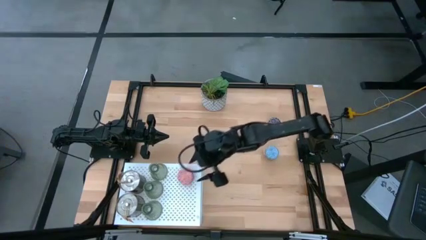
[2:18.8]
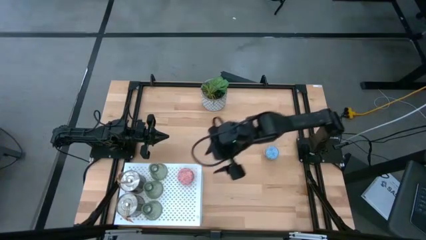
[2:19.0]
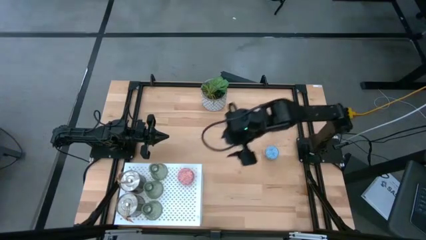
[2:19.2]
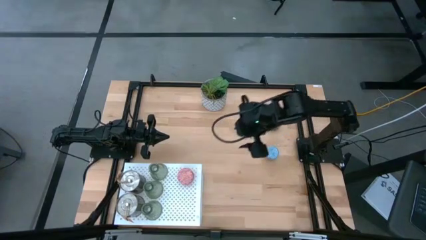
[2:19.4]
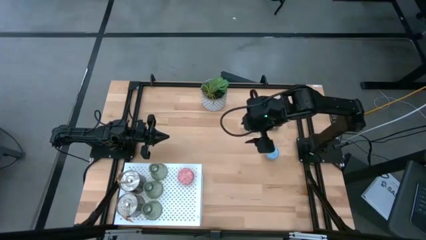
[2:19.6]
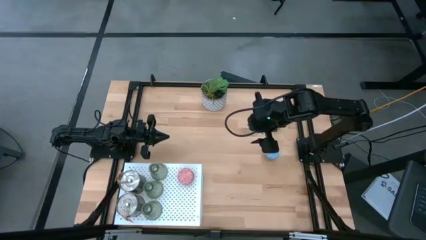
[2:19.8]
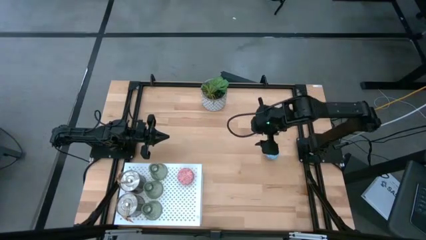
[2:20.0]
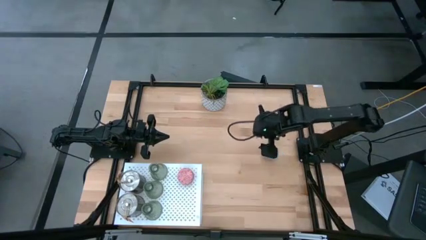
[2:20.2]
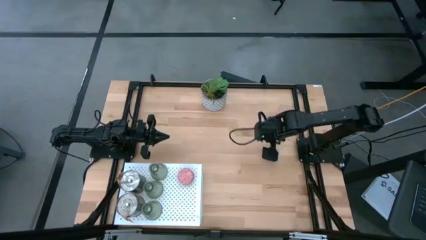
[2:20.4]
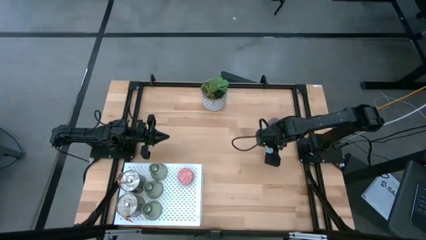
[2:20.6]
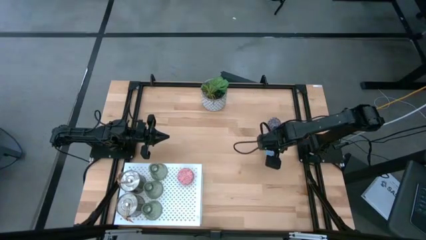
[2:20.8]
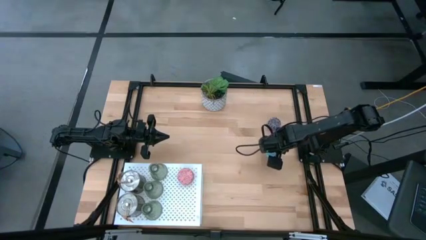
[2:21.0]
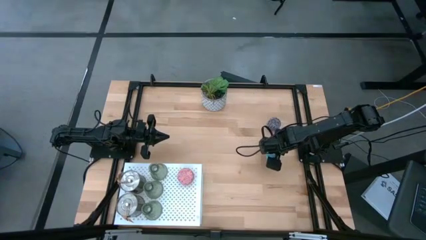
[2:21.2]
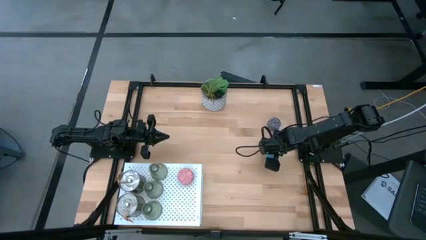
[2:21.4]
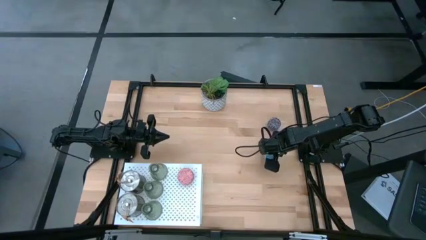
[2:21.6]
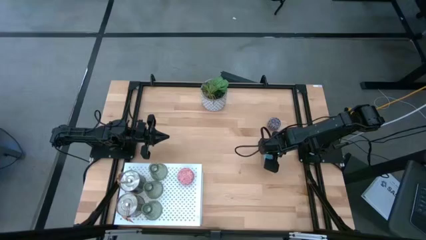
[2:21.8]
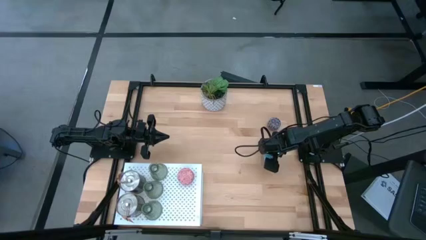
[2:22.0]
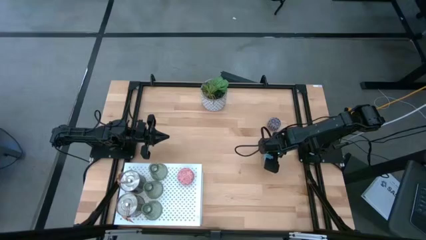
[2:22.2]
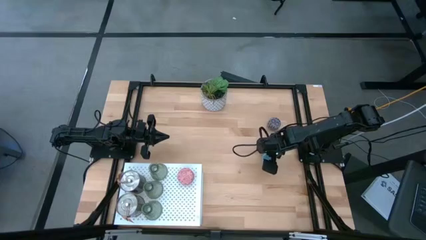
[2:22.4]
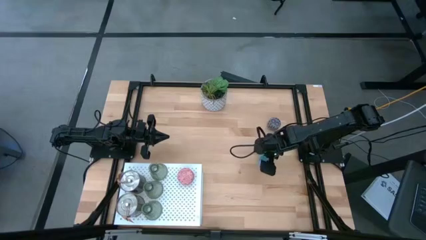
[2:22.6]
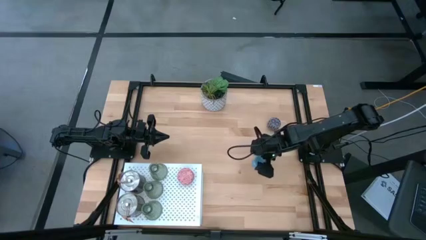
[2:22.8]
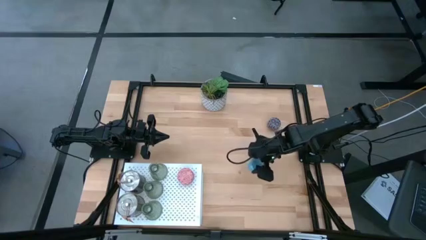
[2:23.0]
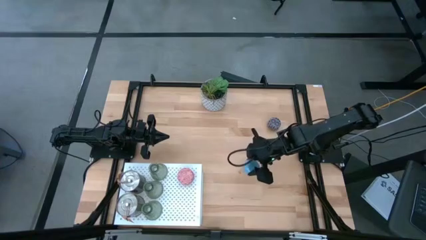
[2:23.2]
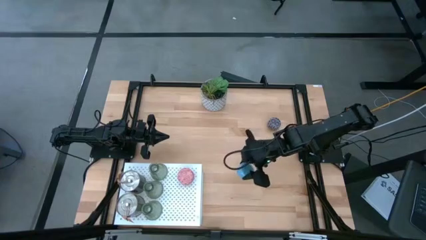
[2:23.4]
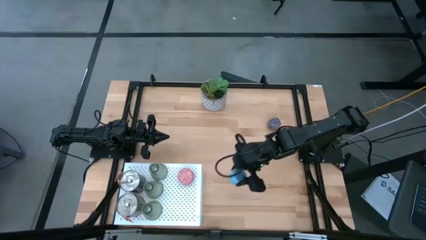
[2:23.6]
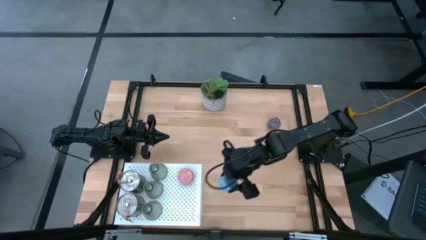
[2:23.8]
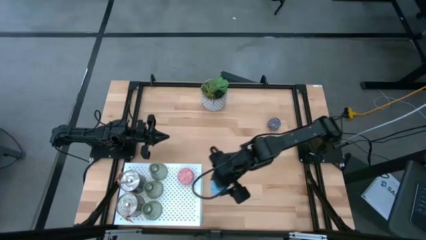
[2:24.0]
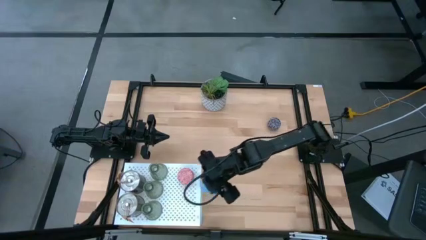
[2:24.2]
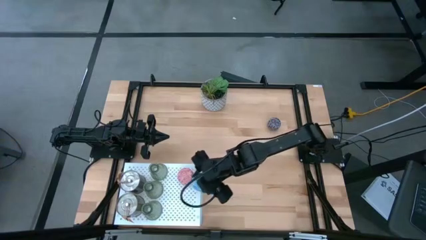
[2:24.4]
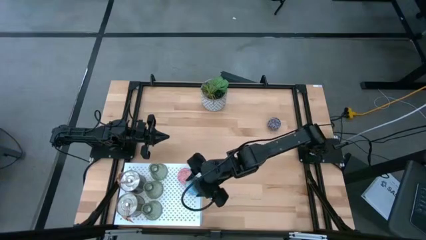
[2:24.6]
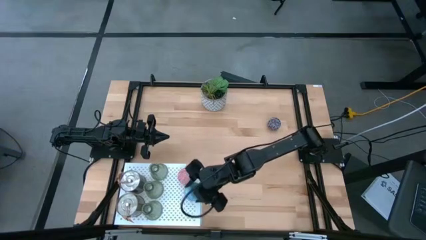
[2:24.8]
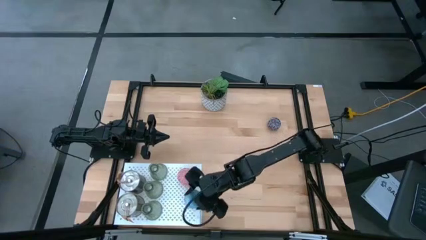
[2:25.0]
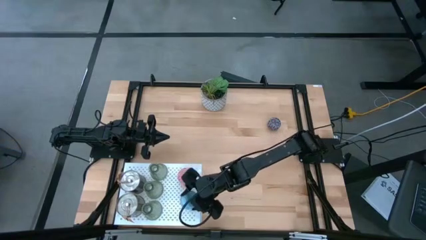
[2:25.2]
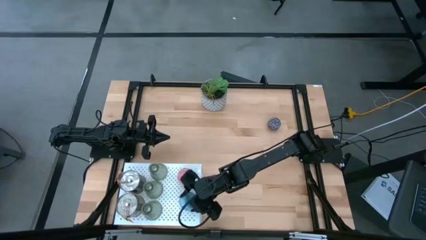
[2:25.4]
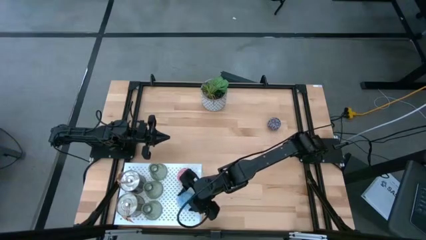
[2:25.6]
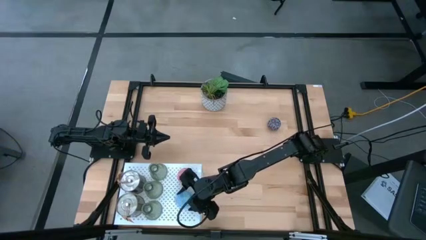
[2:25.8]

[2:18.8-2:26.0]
Task: Pick & Place candle stick holders
Put the blue scented candle on the shelf

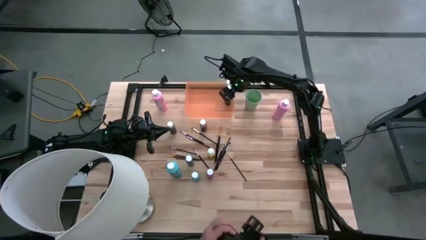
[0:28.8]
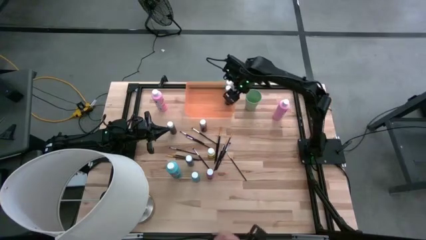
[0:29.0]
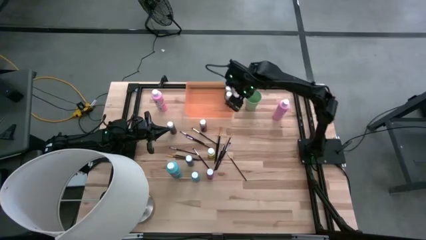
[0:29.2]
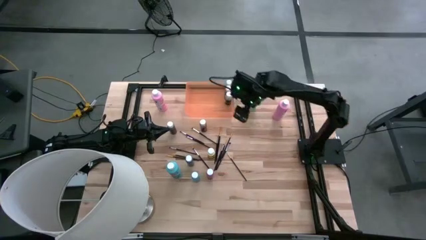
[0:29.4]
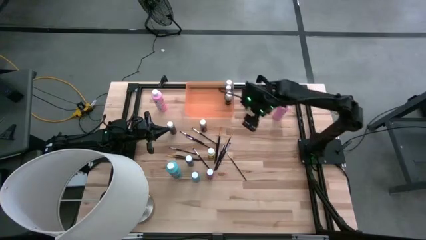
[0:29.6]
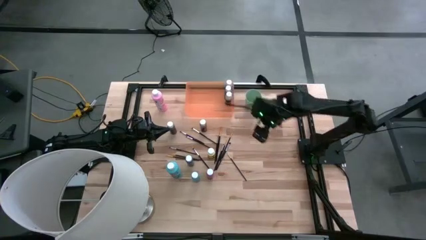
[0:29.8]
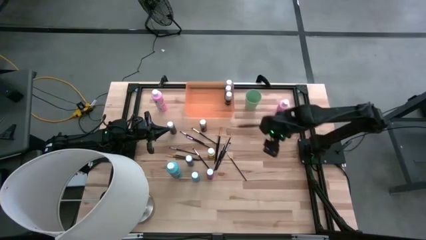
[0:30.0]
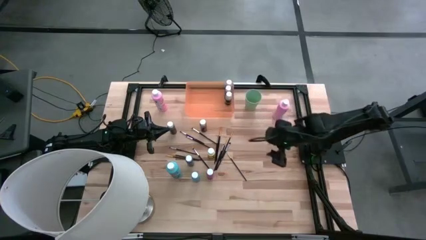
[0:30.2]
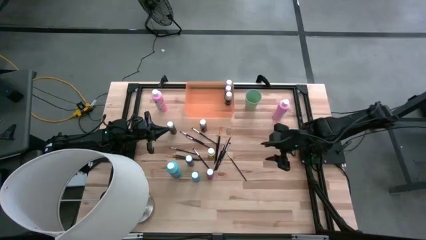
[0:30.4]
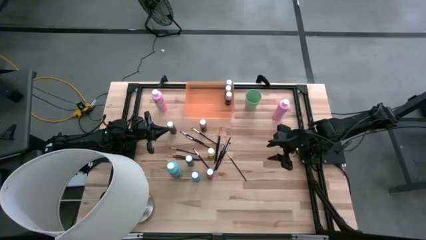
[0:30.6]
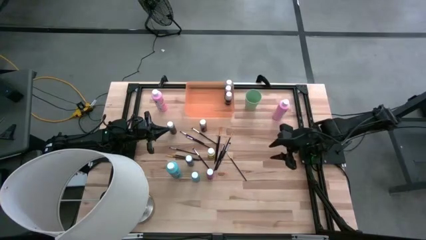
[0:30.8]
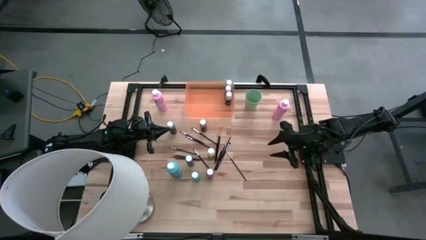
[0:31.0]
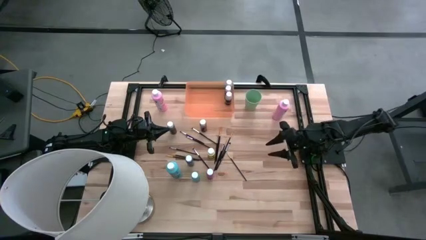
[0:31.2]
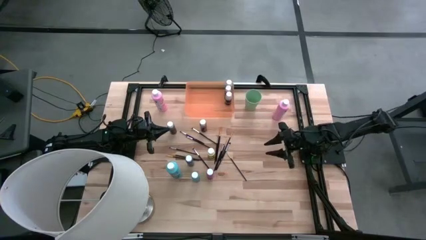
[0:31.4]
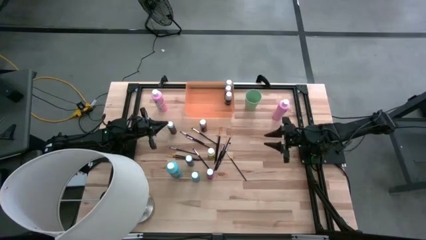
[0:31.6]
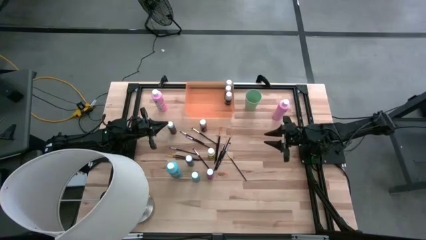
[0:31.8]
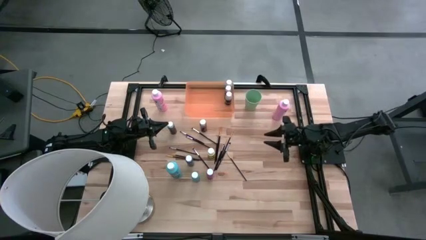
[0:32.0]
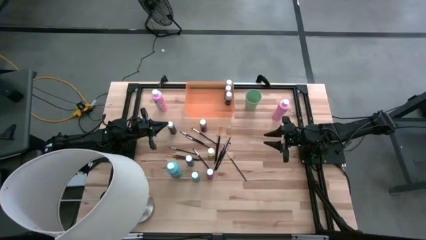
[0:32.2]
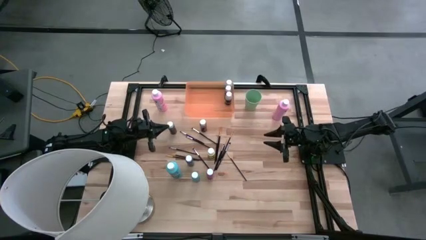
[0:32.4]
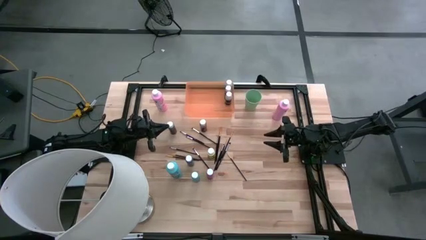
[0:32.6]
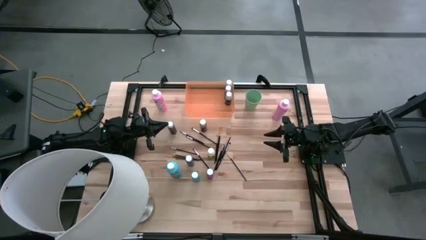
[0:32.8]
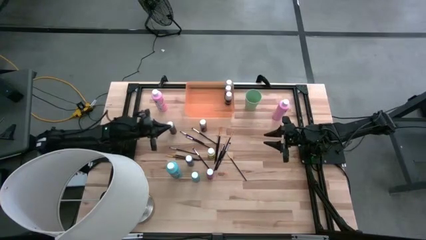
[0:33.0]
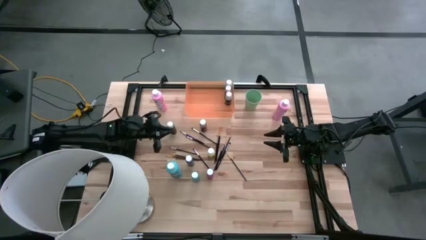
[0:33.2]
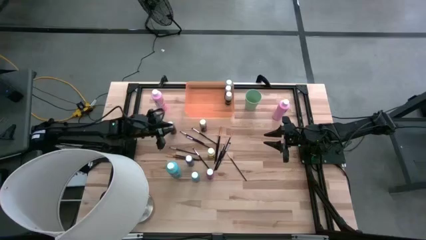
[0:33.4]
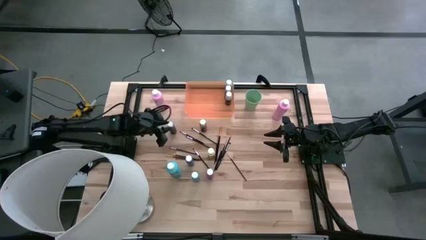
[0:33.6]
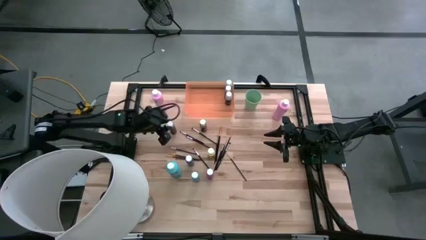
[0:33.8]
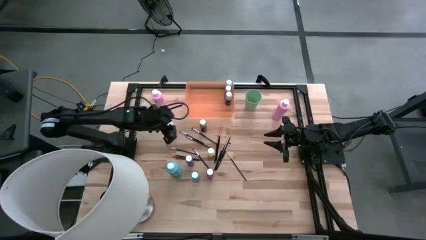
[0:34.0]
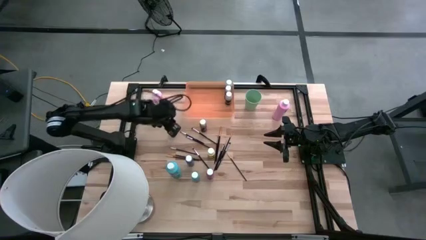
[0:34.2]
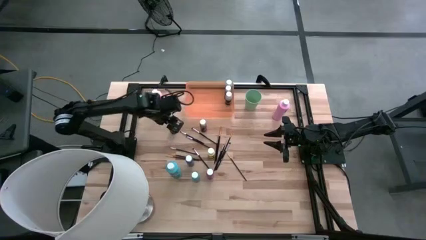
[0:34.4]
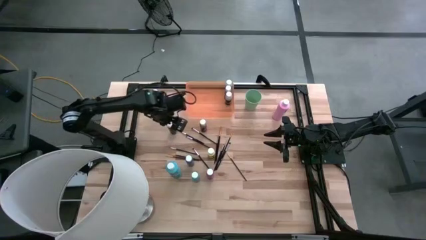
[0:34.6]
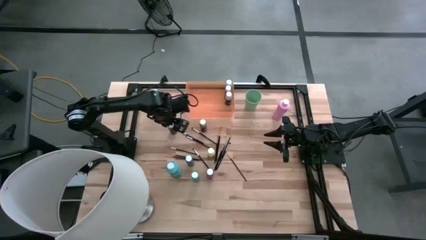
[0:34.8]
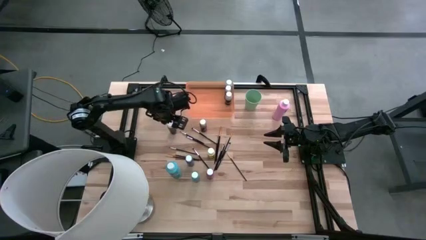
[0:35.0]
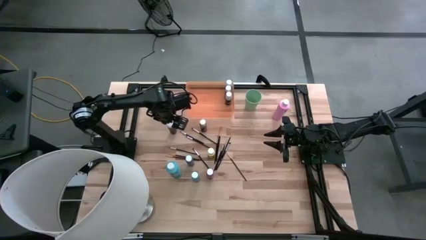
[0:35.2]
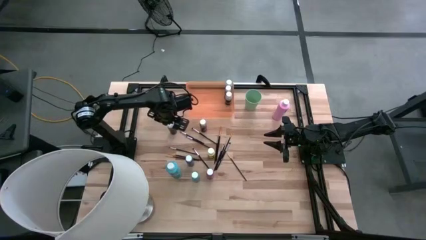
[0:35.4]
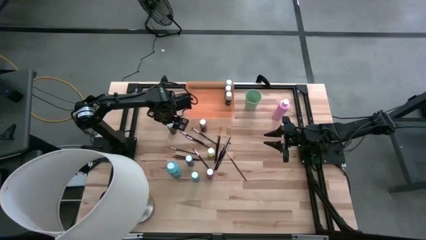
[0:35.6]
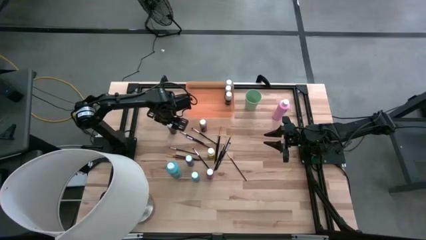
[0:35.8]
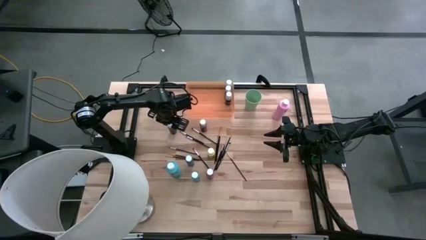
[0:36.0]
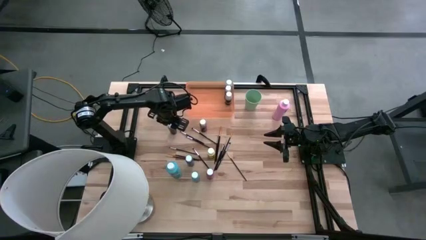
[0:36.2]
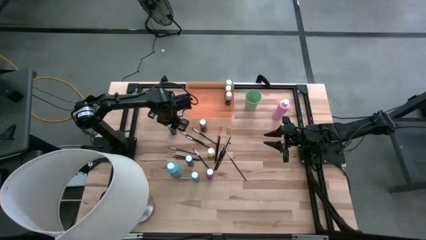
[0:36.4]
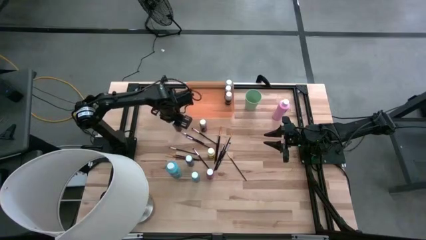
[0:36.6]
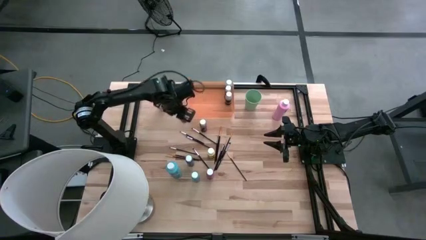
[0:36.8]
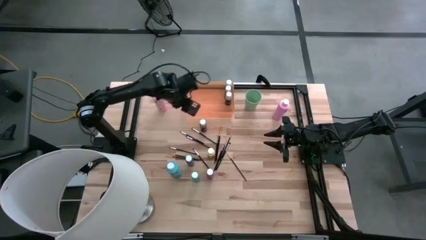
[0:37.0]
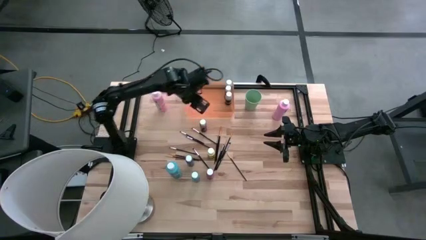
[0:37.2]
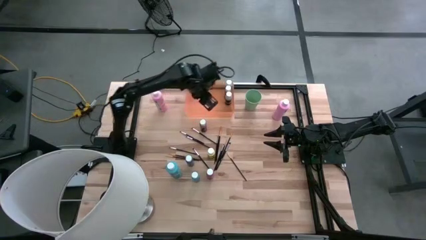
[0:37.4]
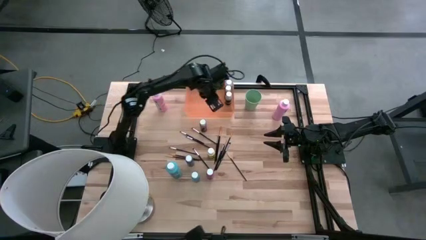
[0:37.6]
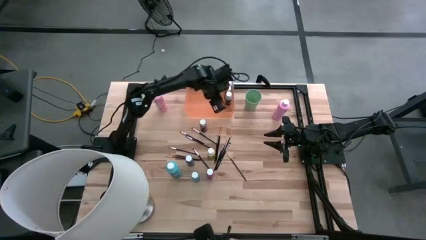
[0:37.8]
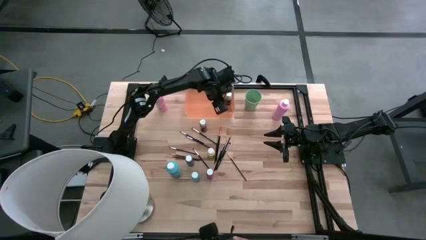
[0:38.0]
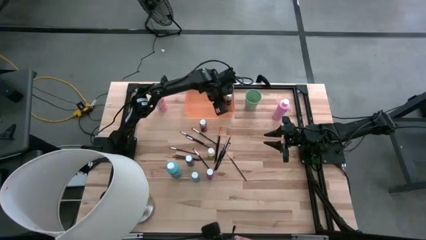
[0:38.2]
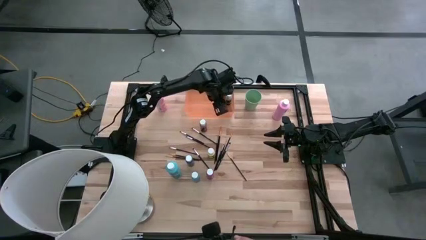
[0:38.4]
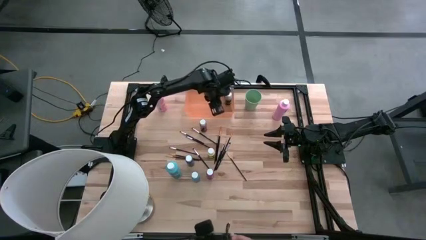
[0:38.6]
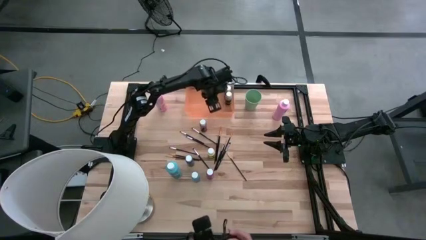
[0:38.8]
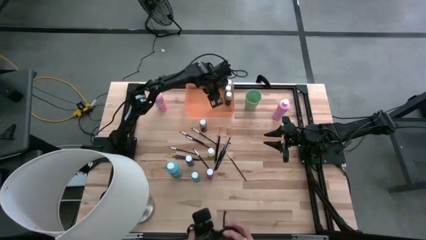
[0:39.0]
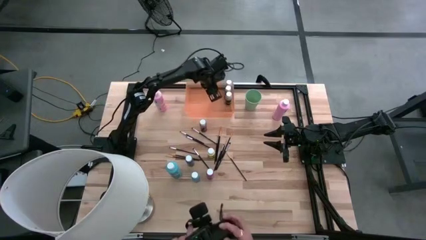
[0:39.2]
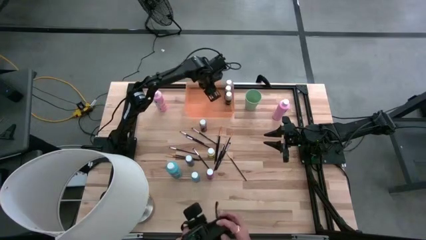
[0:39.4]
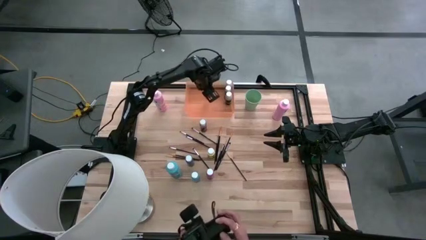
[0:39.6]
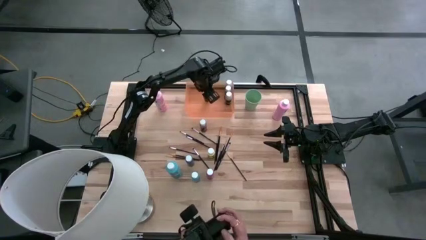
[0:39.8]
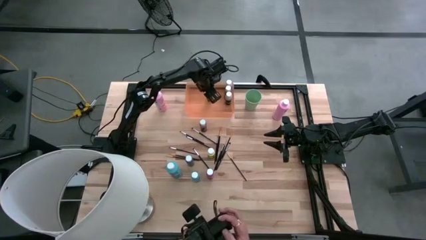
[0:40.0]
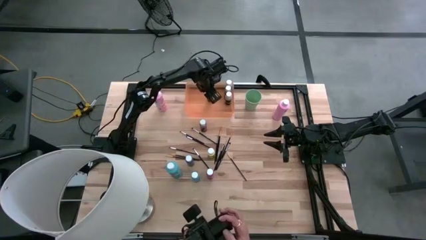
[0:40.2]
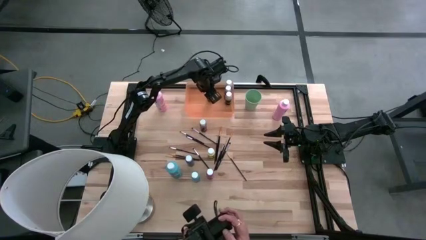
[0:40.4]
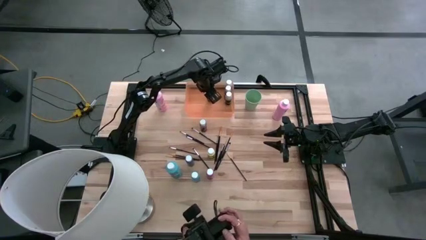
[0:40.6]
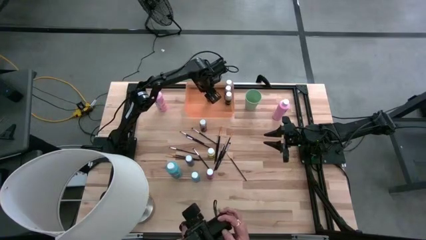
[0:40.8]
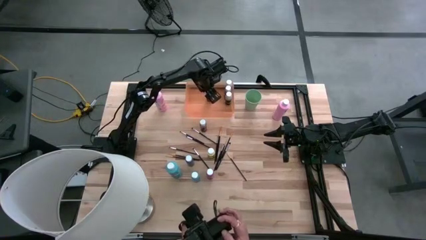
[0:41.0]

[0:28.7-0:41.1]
Task: Pick & Place Paint Supplies
Put the small brown paint bottle into the orange bin
